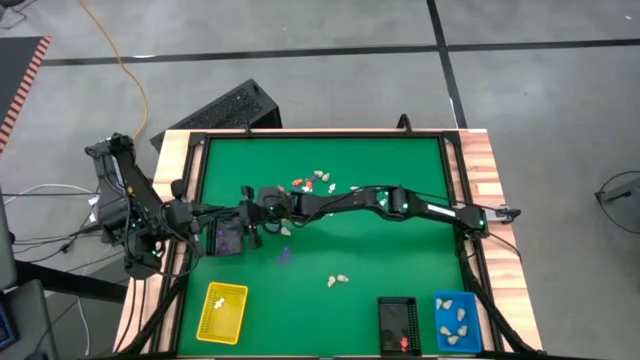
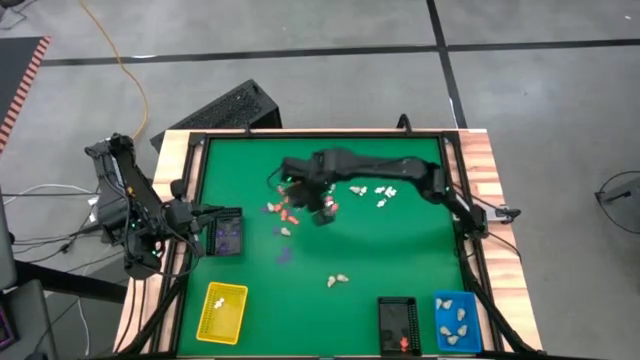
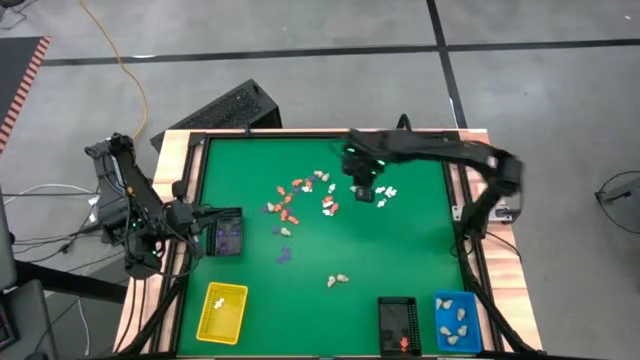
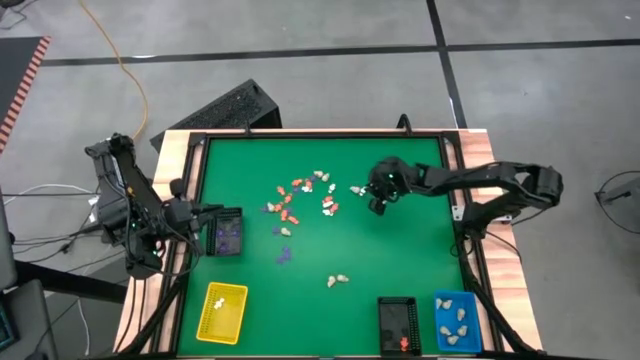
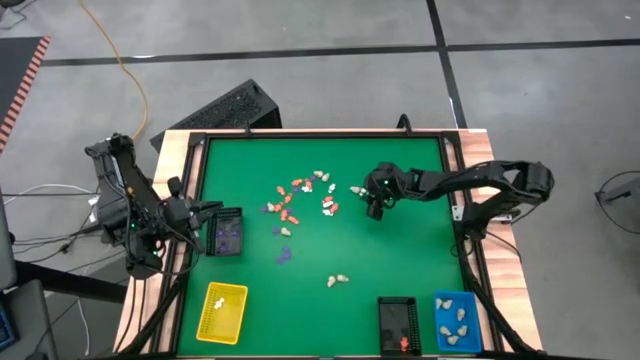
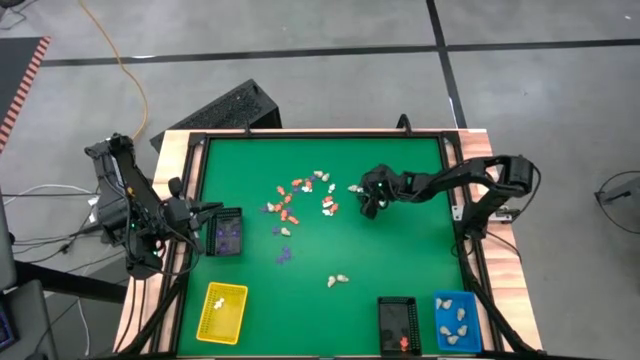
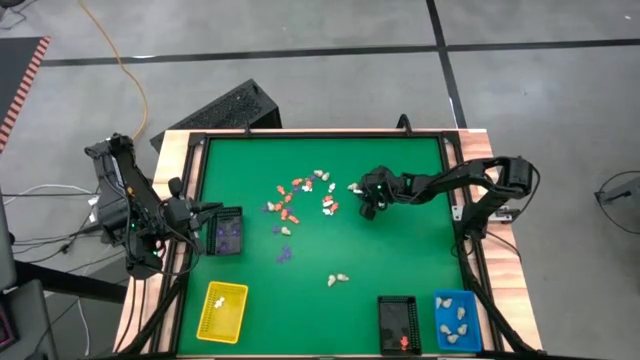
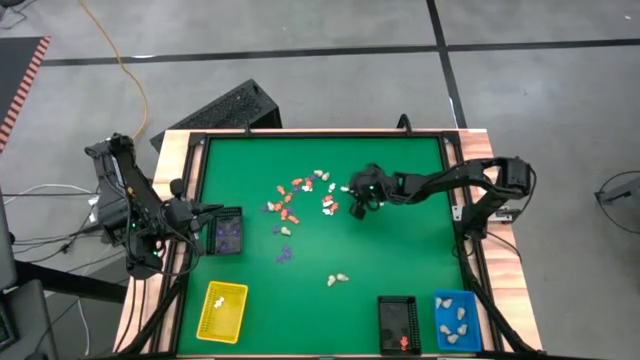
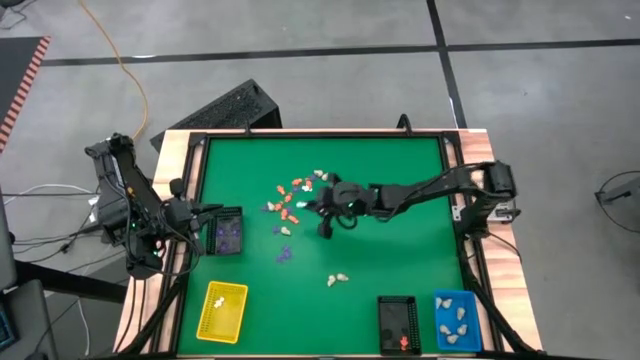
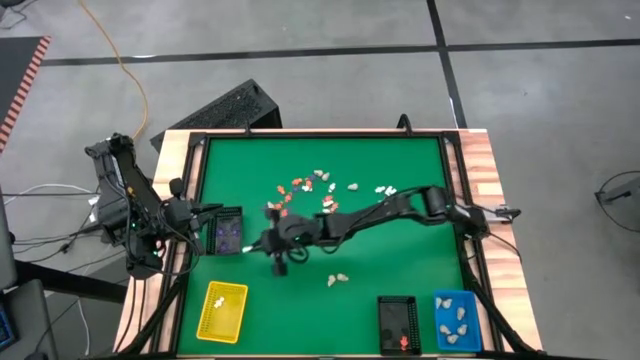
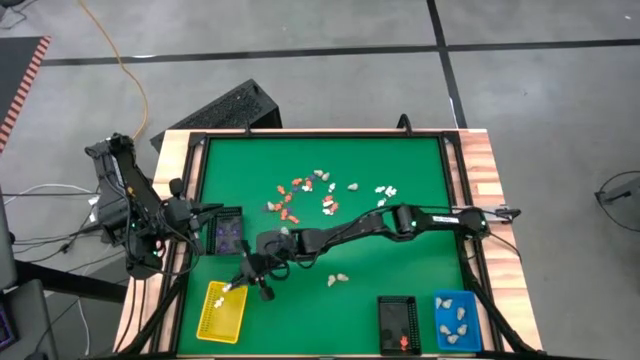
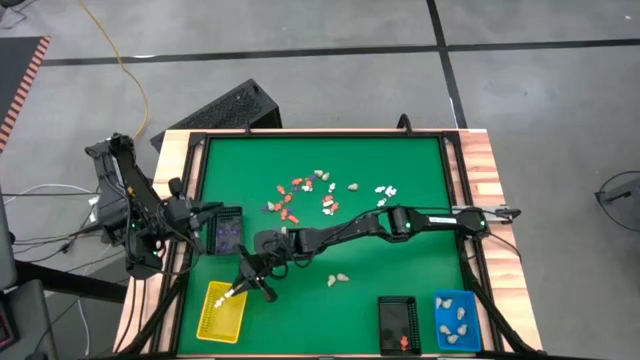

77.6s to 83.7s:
Task: Sort Halloween decoration
Put the white skeleton toy into the yellow basket

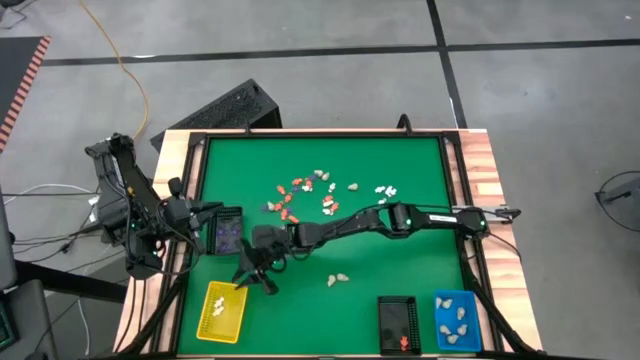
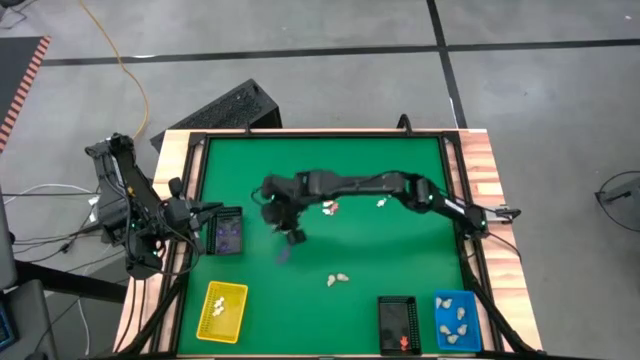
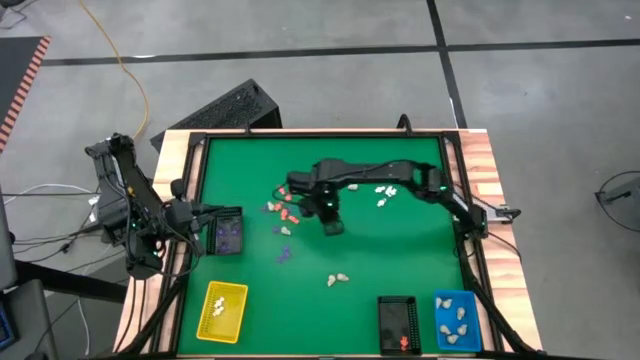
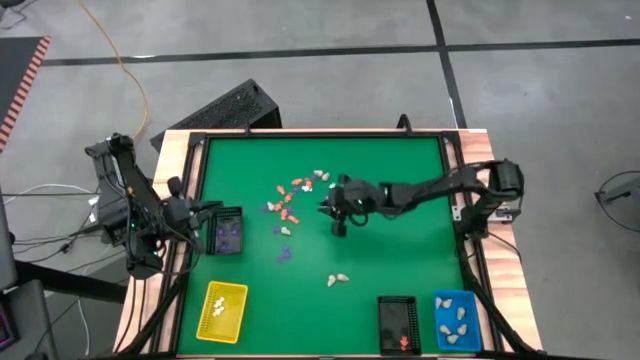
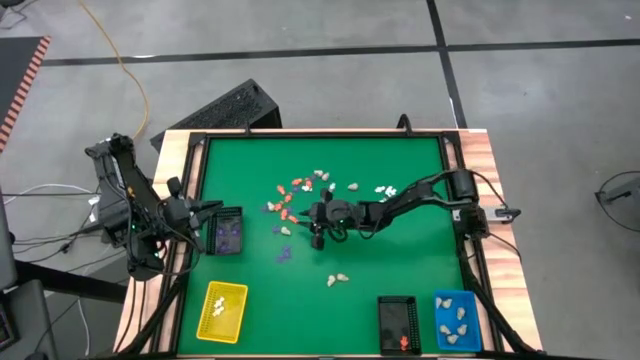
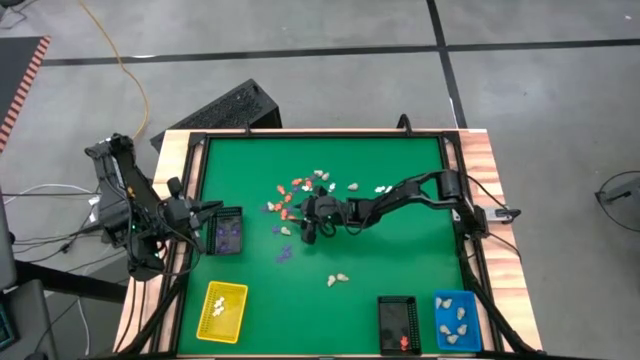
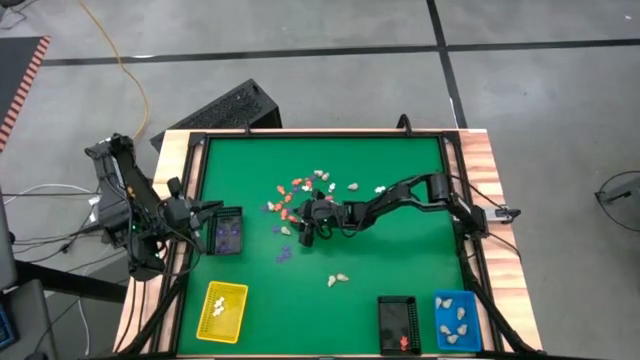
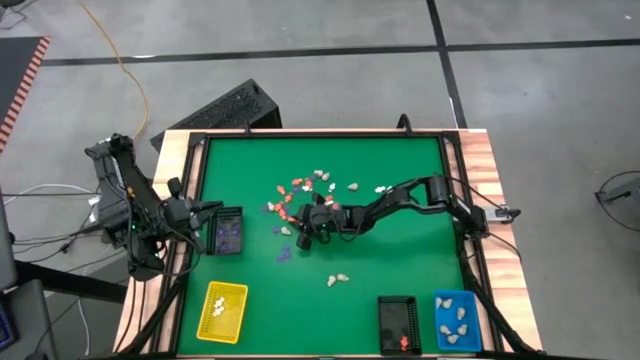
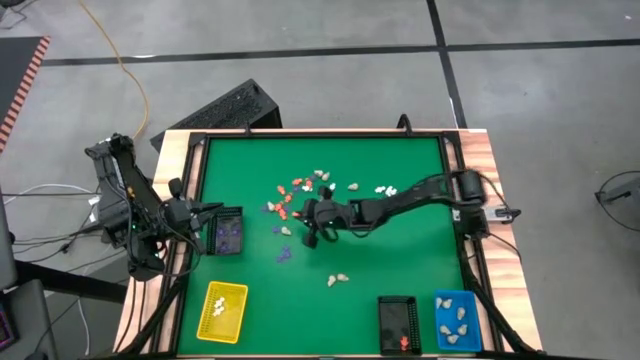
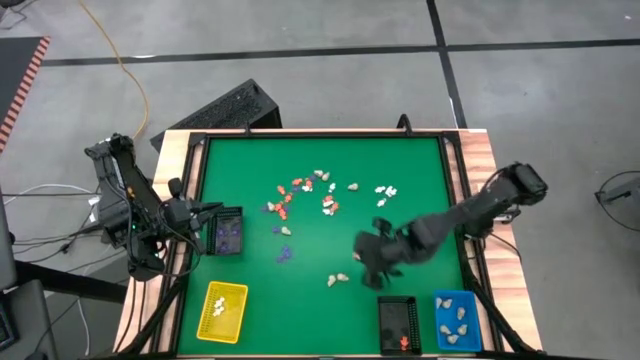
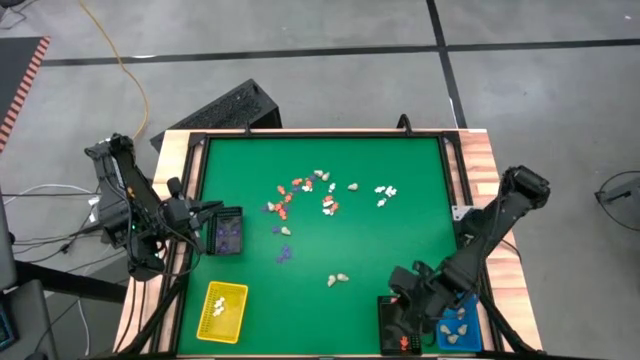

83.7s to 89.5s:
Put the orange skeleton toy into the black basket

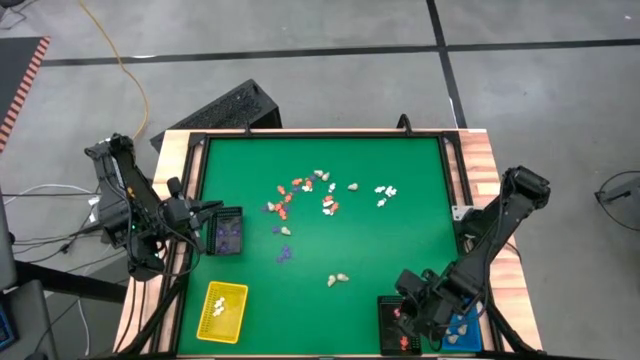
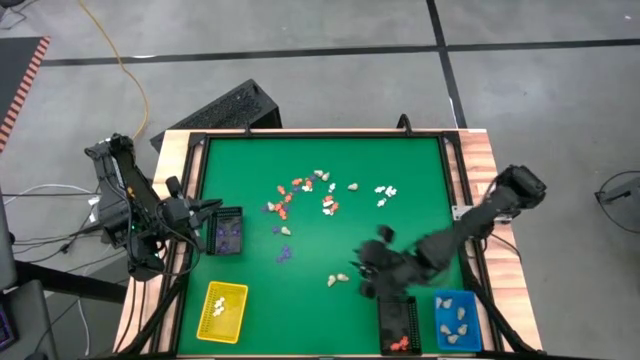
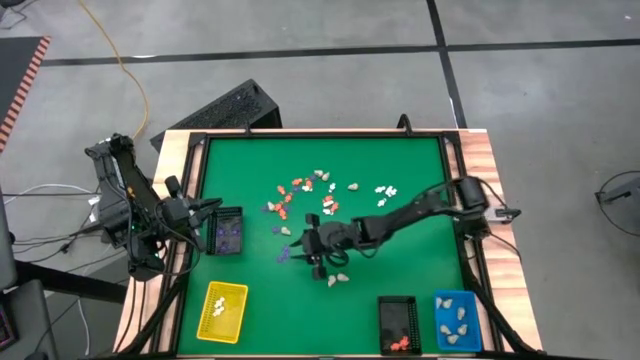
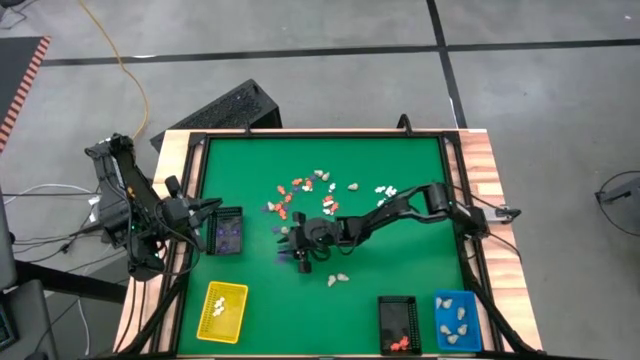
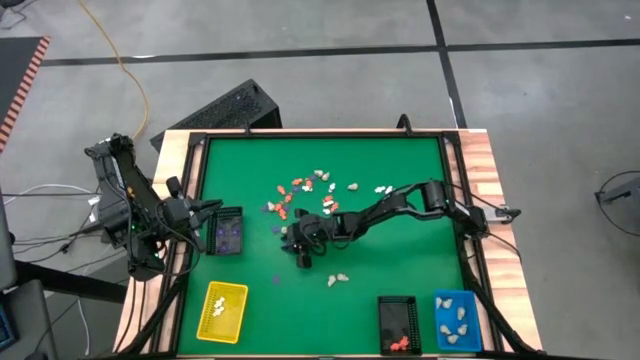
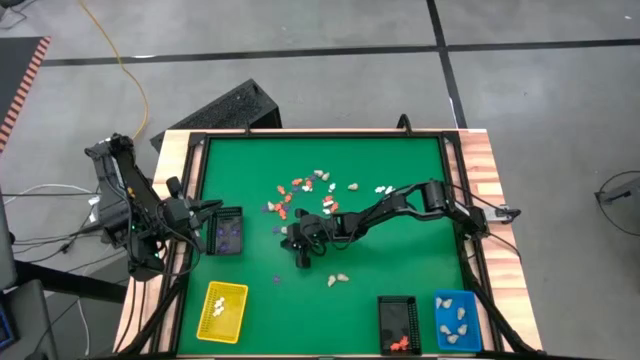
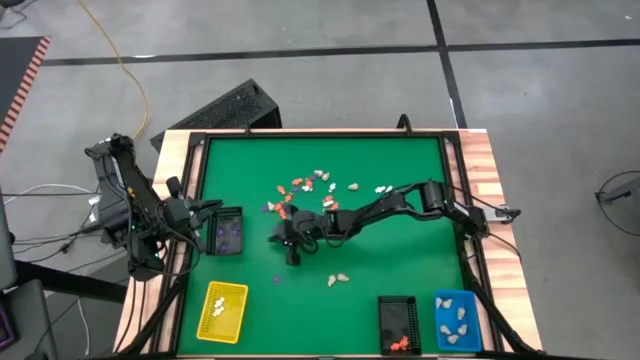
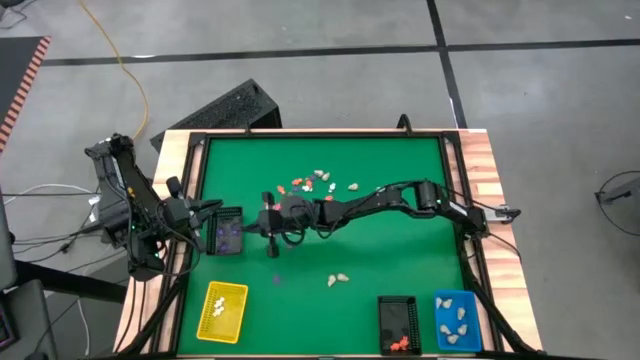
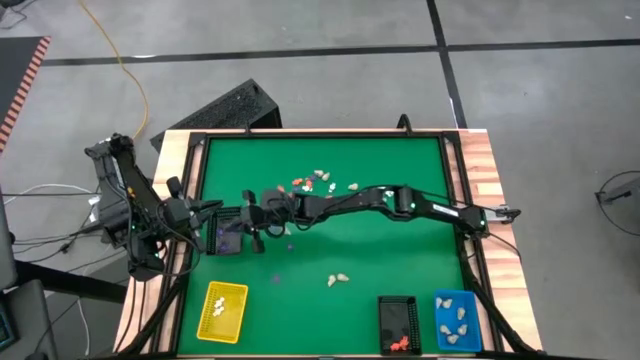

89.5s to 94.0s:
Put the purple spider toy into the top black basket

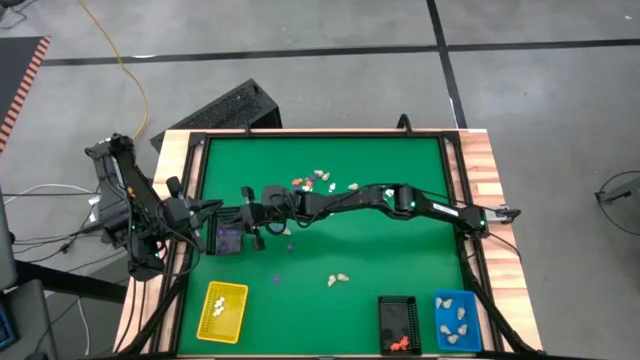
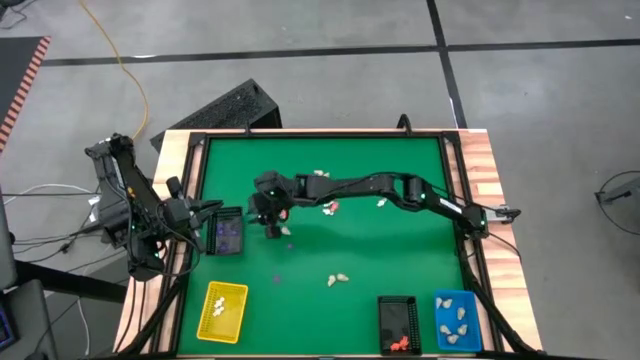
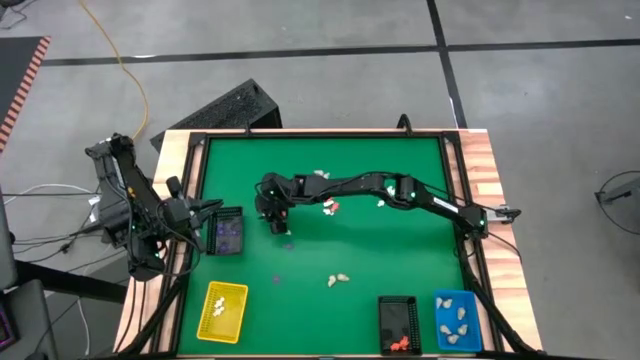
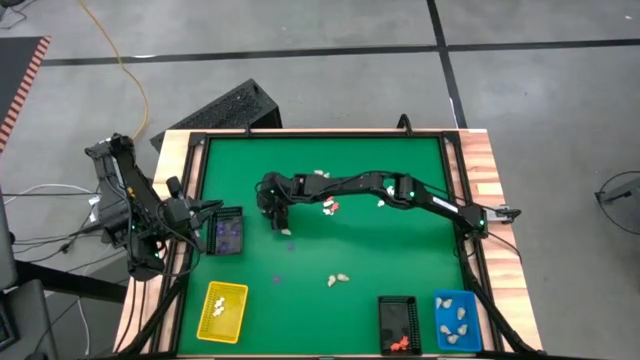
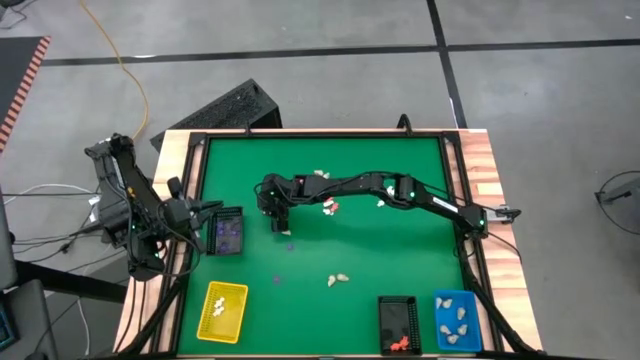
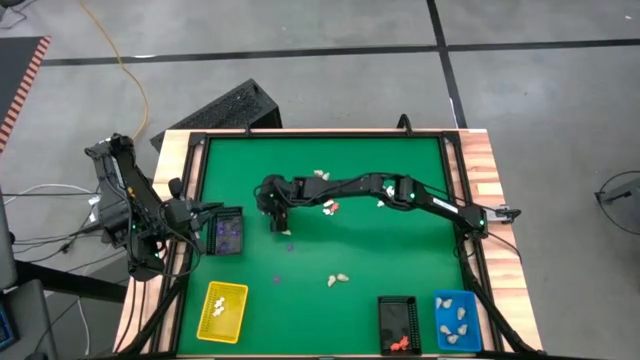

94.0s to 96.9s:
Put the purple spider toy into the top black basket

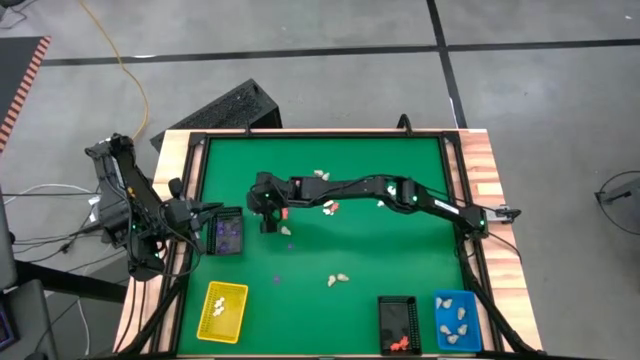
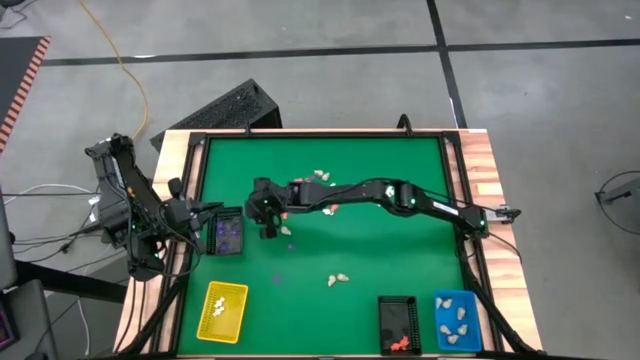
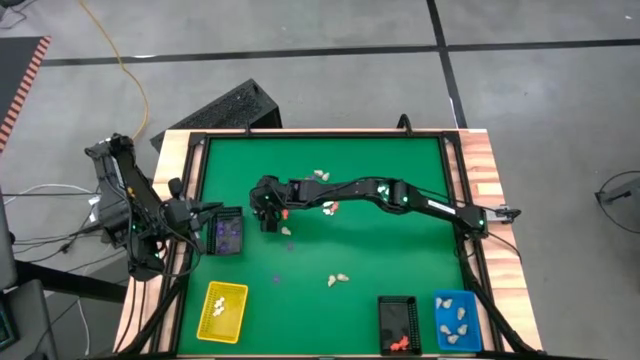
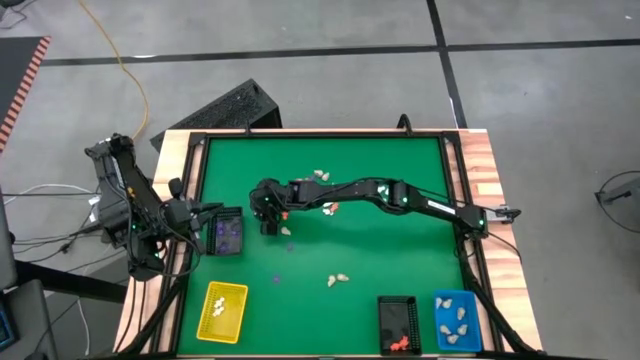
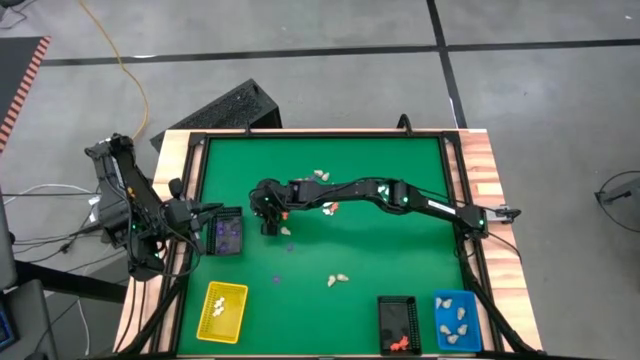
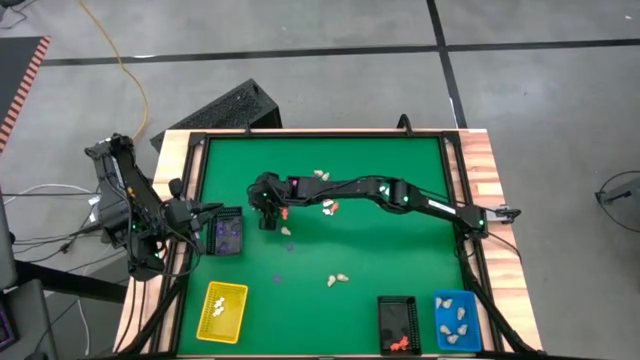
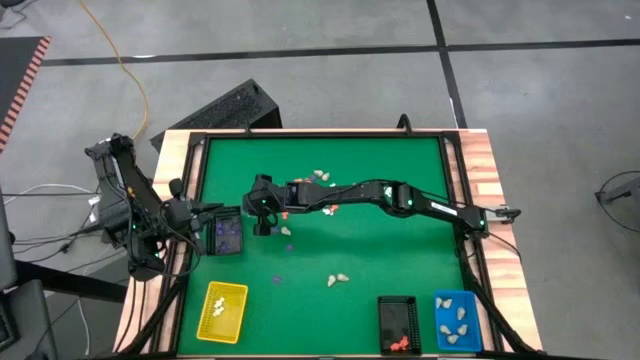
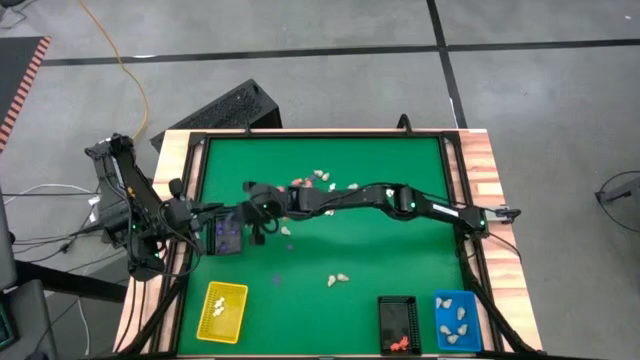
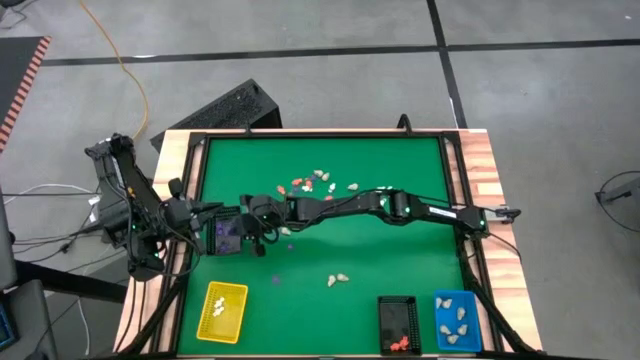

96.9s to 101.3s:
Put the purple spider toy into the top black basket
